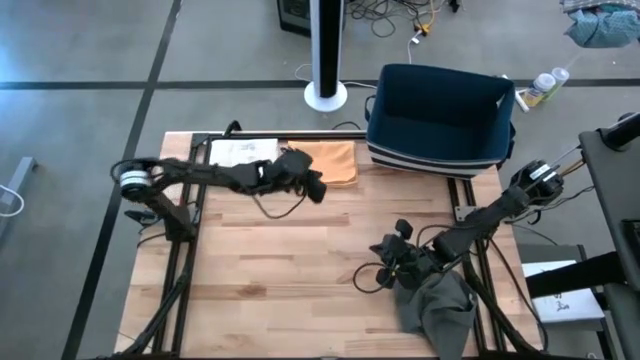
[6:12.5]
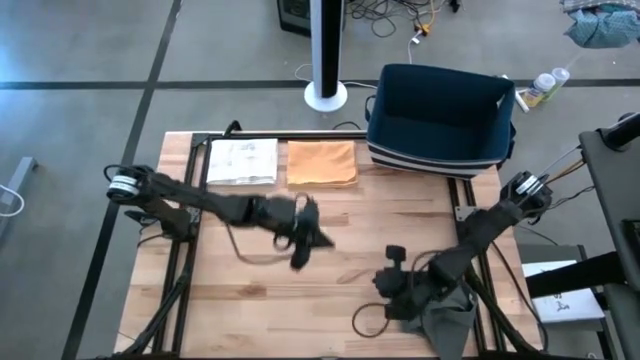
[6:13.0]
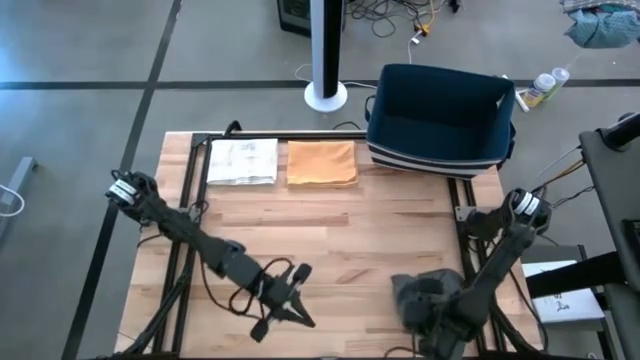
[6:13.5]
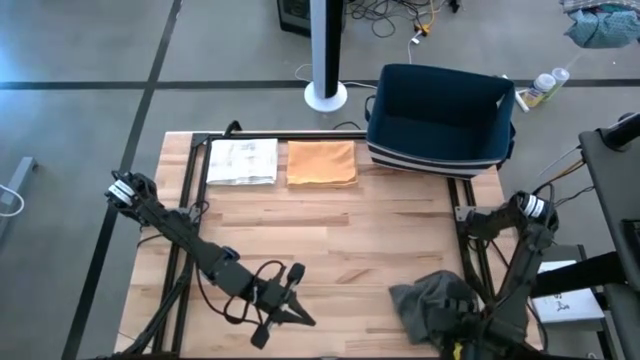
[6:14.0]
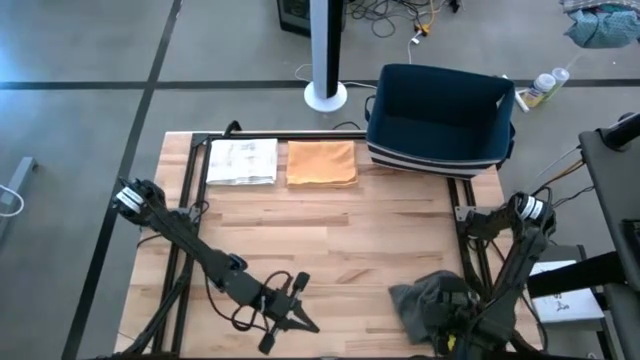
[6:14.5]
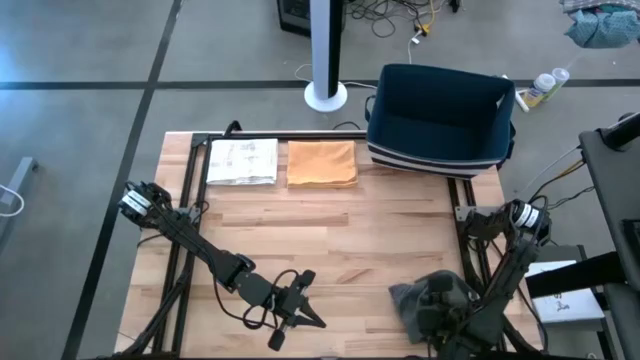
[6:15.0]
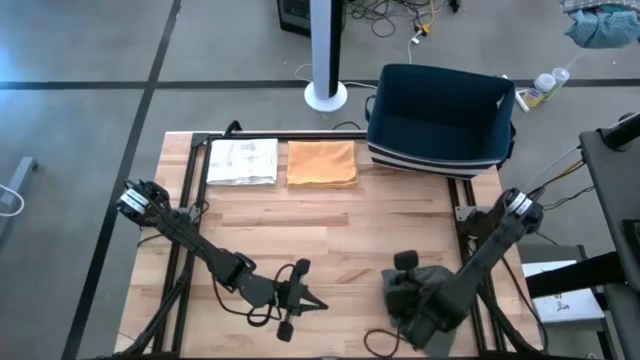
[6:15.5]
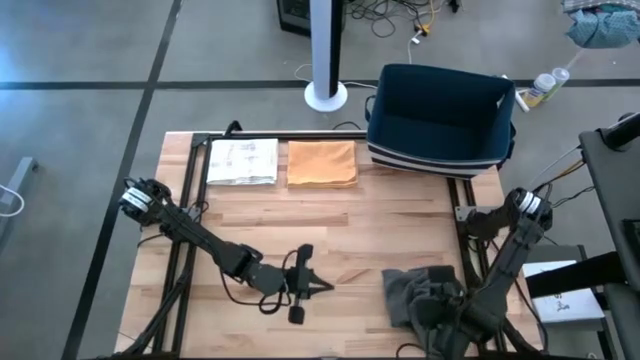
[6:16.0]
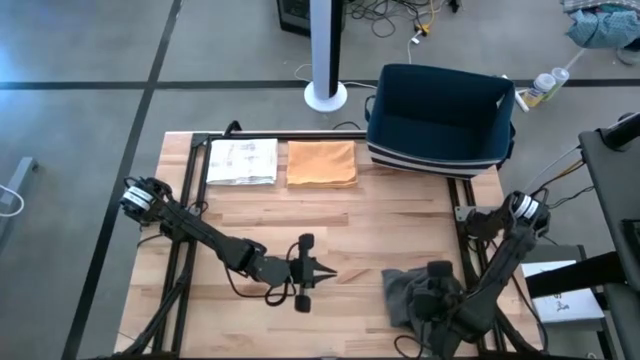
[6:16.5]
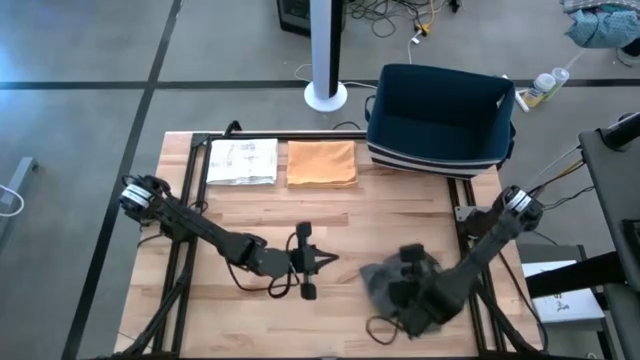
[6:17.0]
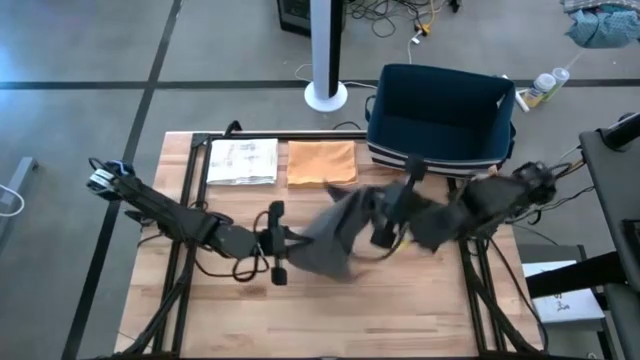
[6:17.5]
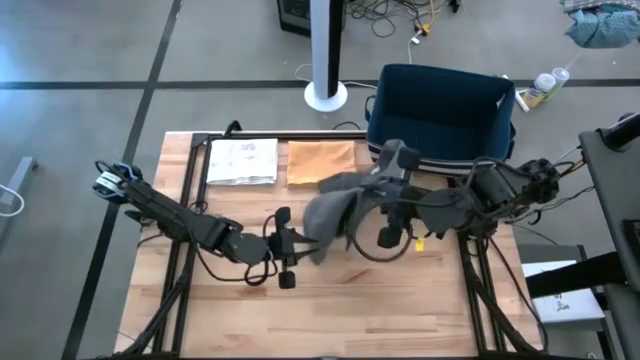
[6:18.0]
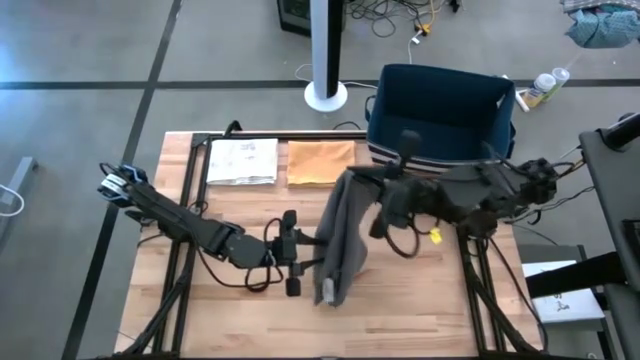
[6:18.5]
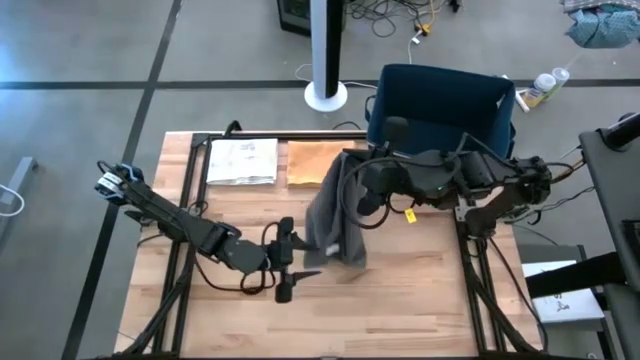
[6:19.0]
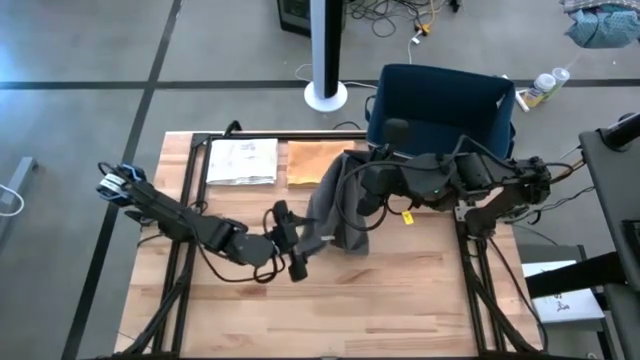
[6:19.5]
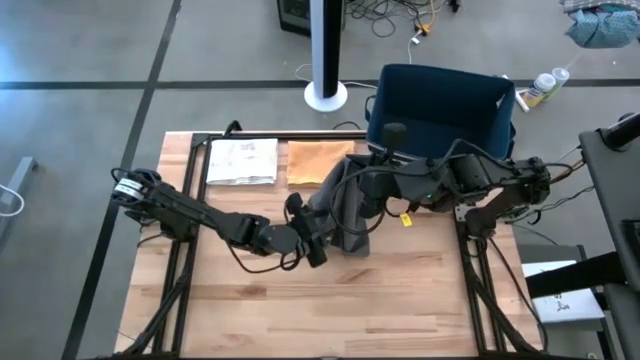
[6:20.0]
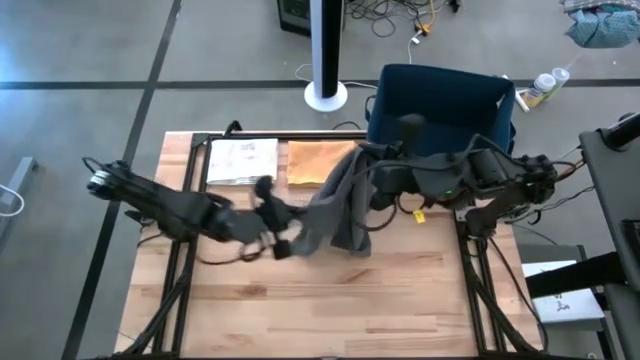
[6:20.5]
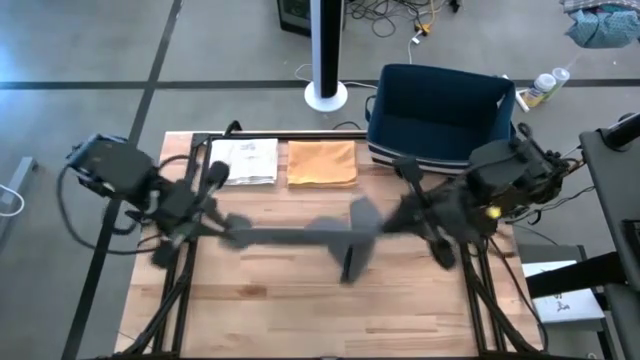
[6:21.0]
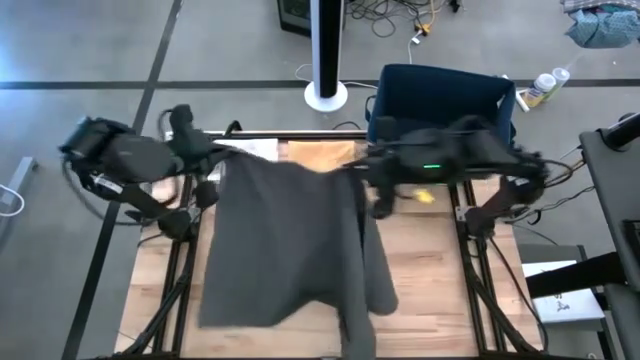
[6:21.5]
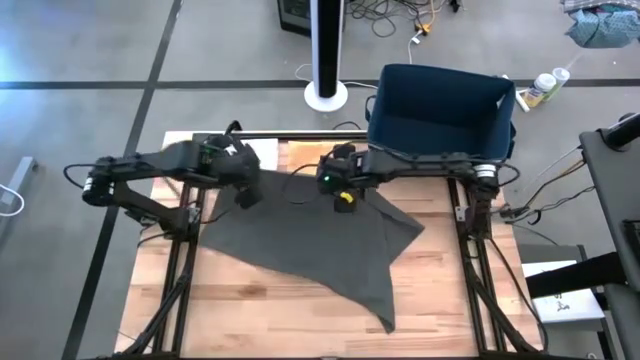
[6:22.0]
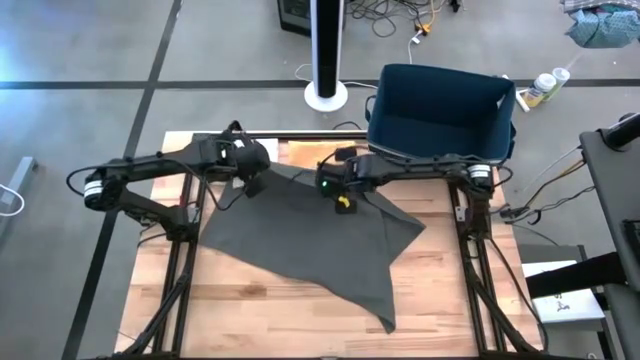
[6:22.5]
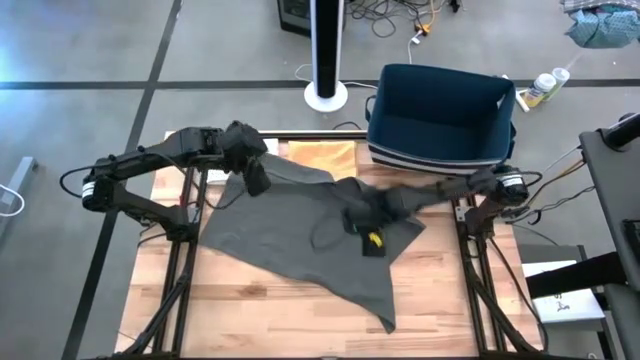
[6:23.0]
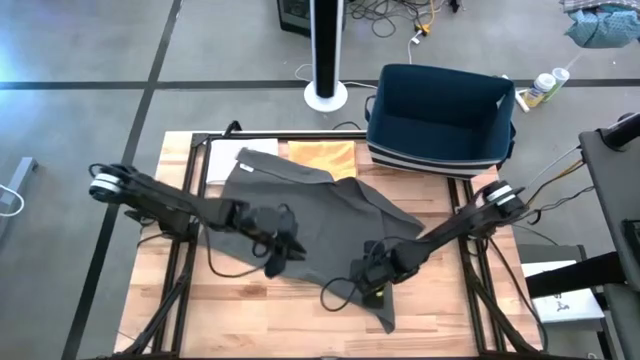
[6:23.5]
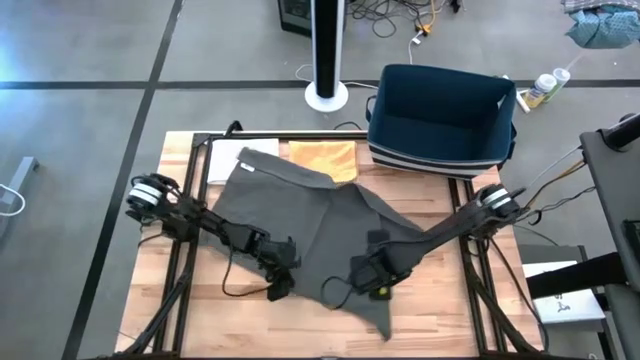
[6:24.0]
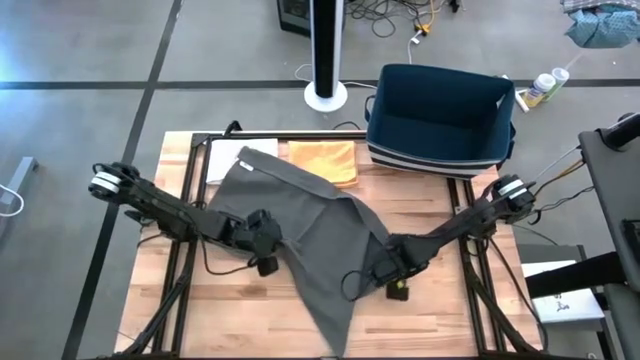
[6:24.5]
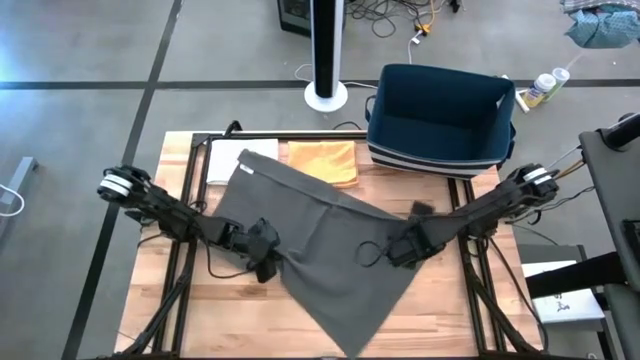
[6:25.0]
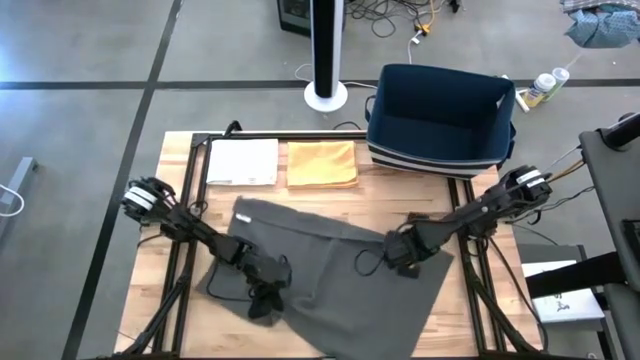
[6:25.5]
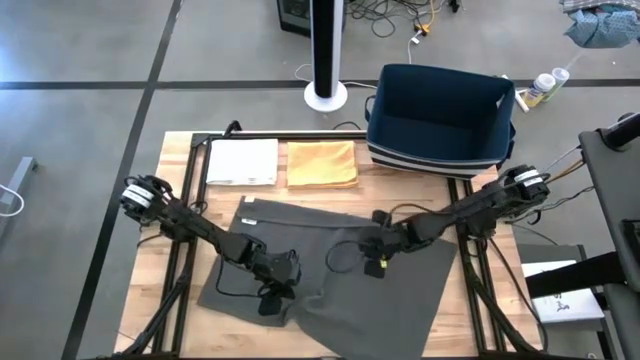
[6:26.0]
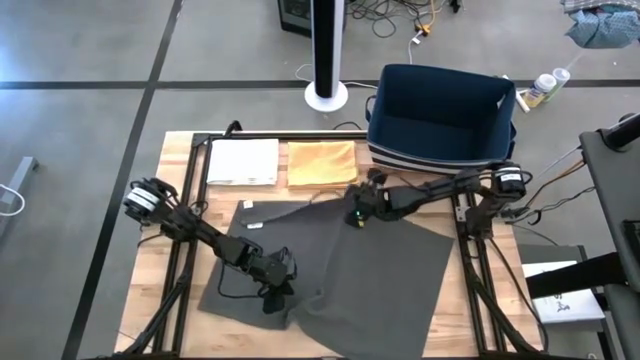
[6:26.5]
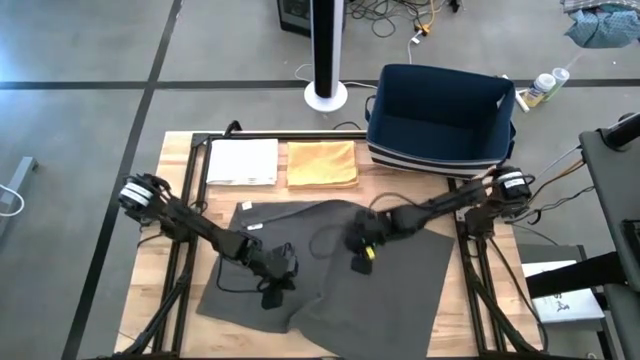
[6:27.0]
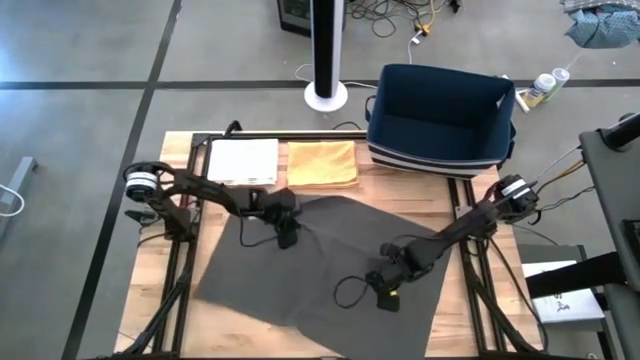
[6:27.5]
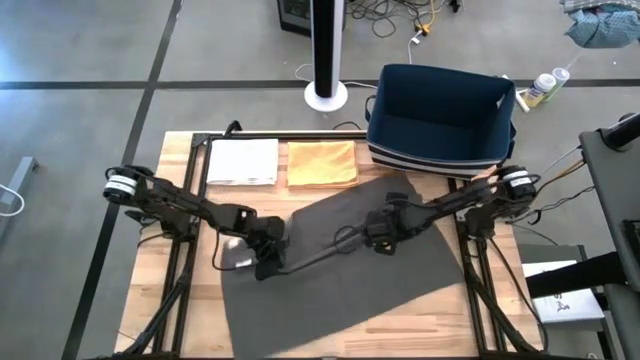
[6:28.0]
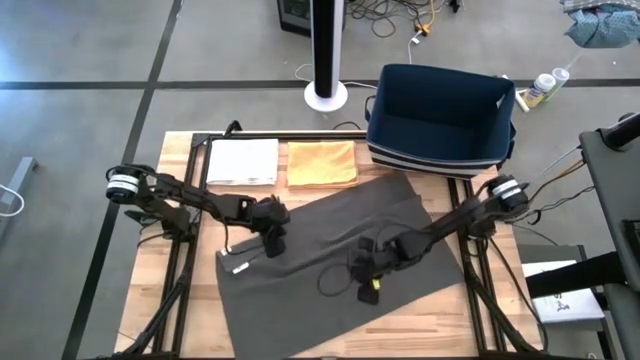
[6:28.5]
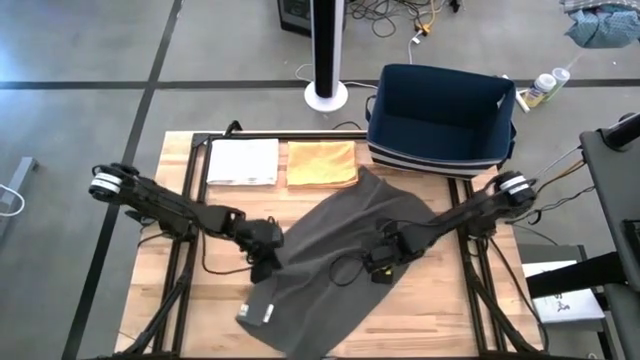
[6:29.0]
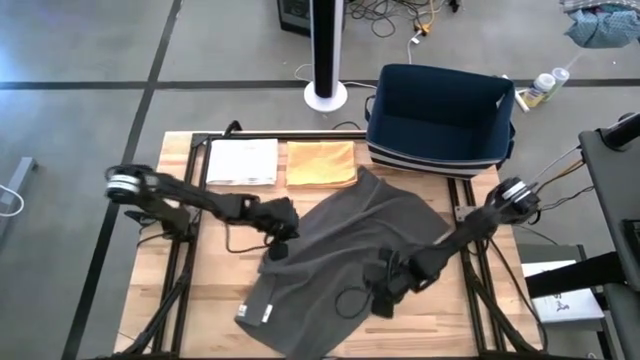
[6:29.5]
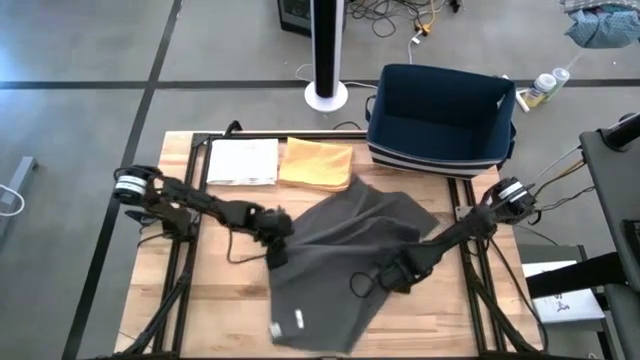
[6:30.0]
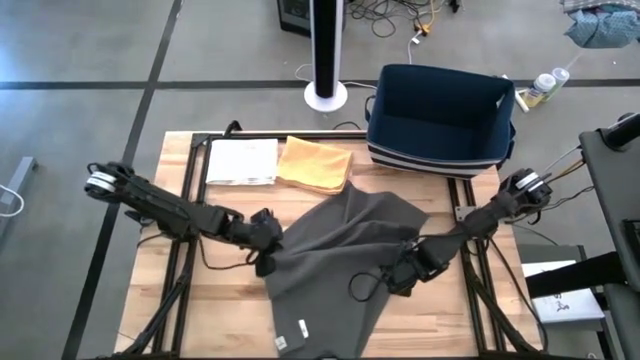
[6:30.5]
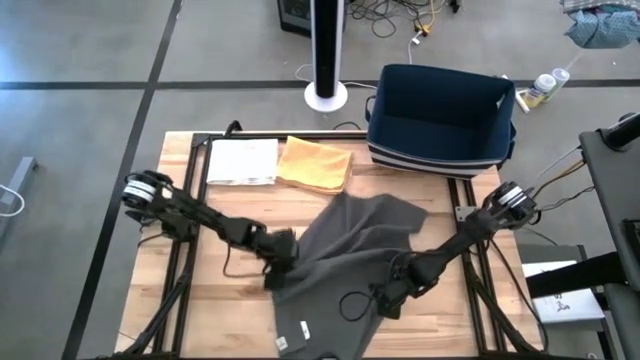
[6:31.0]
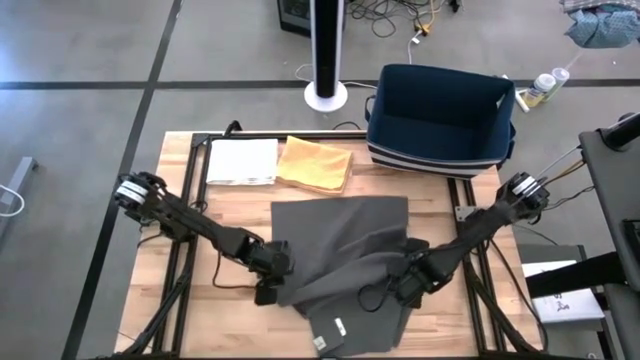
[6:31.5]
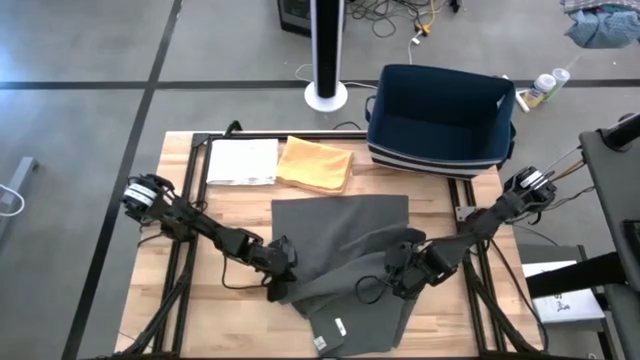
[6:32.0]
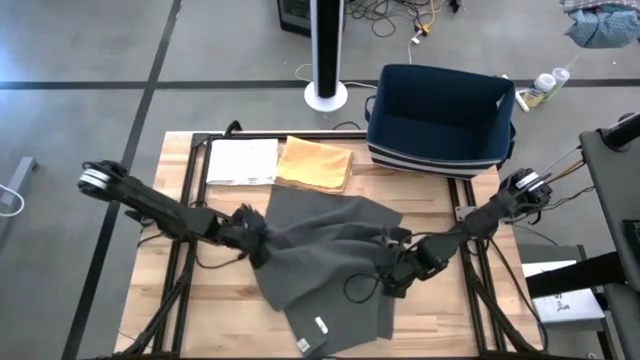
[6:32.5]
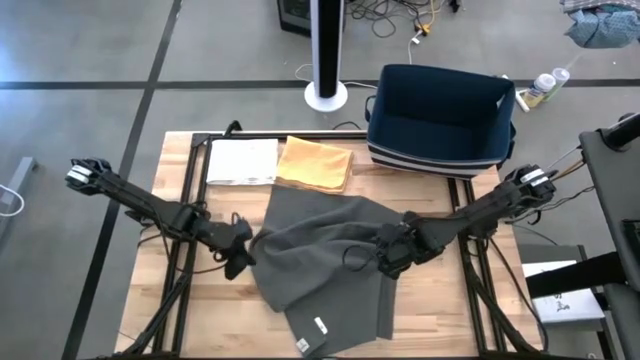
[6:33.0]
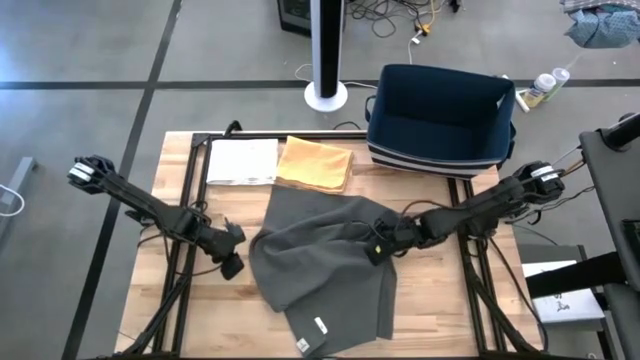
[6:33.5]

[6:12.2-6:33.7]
Task: Fold towel
Fold the black towel

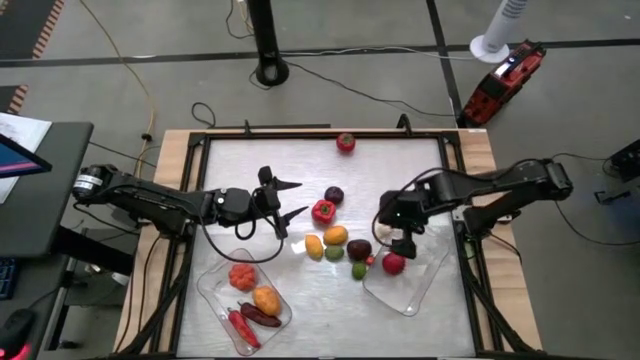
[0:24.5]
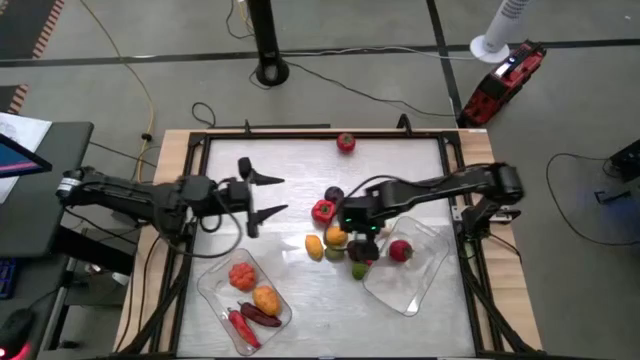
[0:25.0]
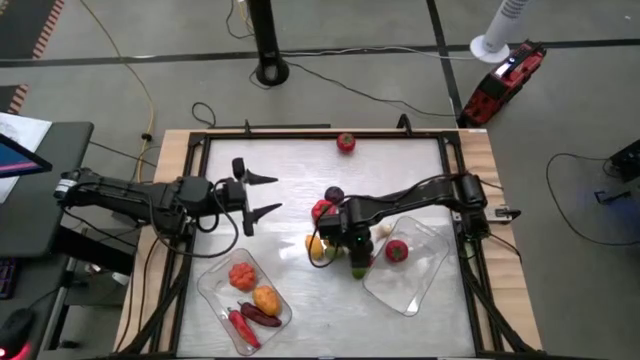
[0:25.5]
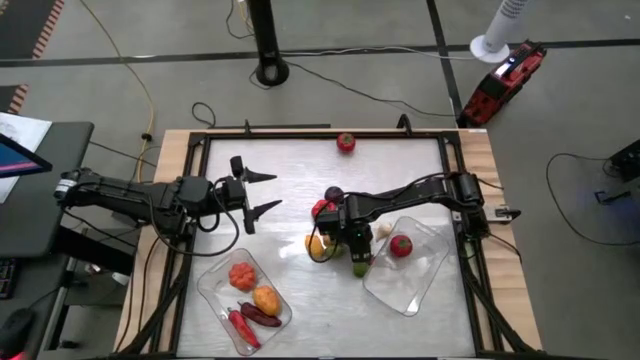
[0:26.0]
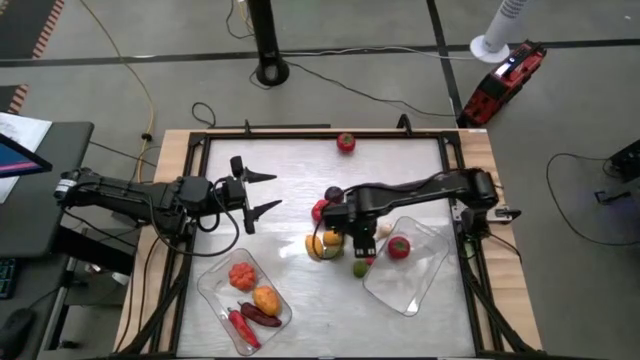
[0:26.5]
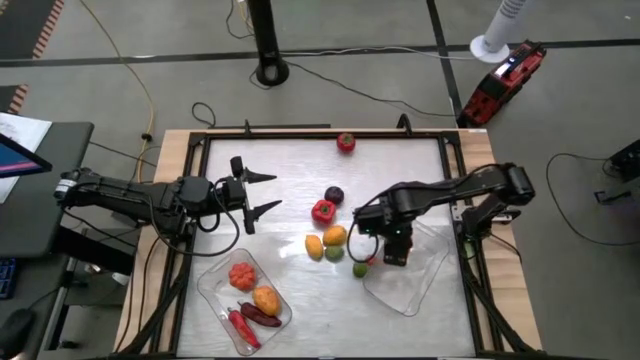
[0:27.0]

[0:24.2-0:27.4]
Task: Sort produce into baskets
Put the dark red apple into the right transparent bin
